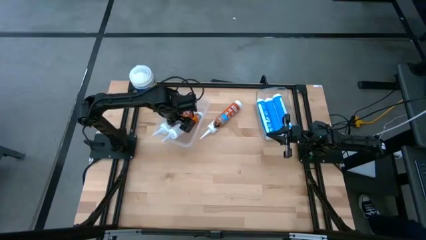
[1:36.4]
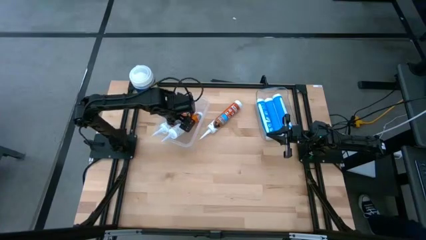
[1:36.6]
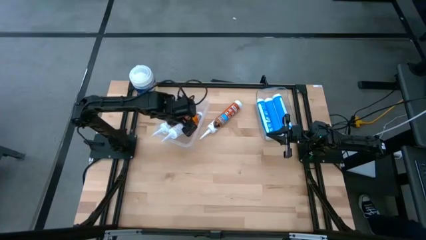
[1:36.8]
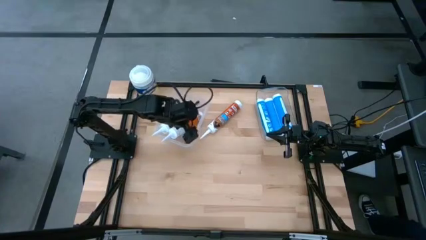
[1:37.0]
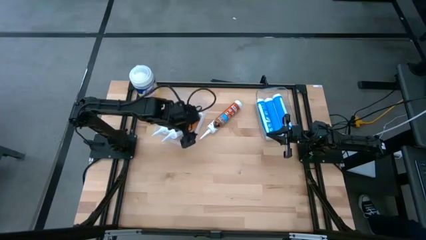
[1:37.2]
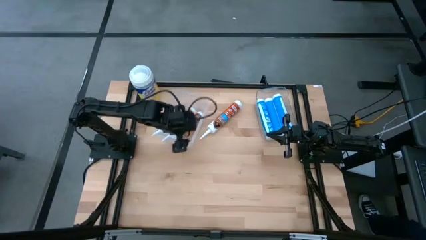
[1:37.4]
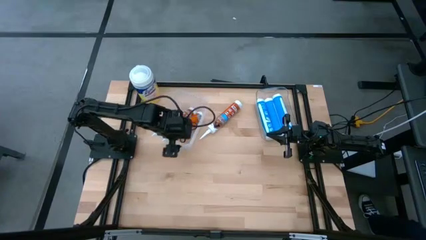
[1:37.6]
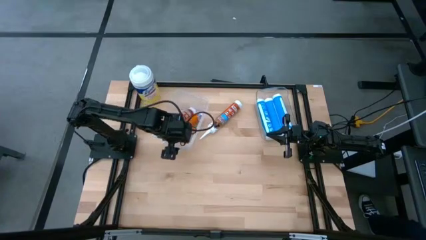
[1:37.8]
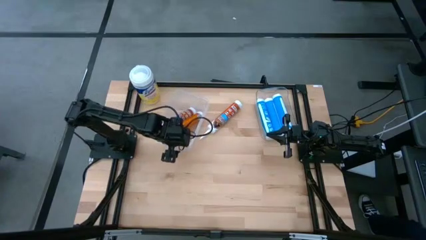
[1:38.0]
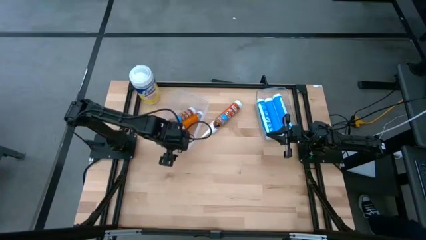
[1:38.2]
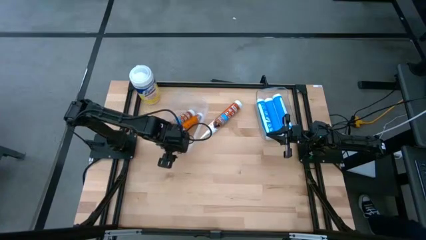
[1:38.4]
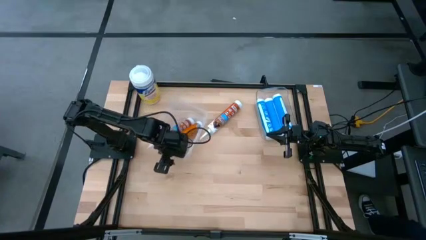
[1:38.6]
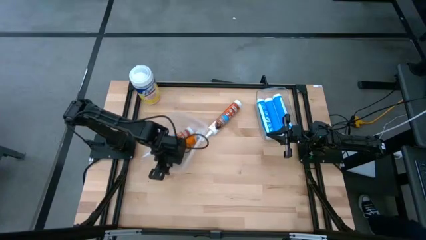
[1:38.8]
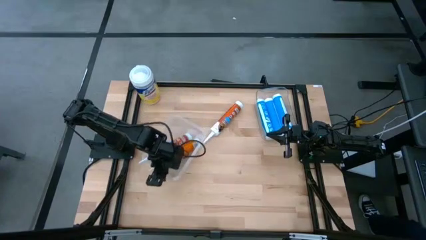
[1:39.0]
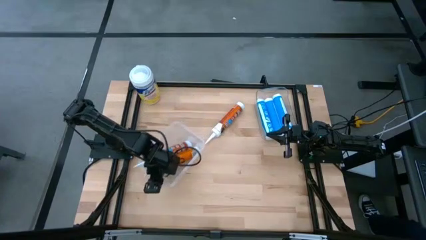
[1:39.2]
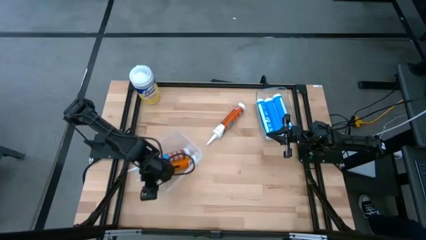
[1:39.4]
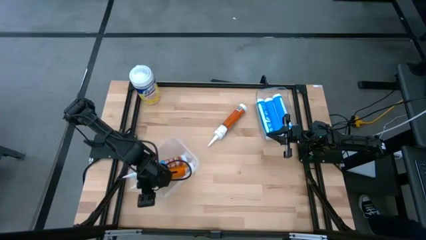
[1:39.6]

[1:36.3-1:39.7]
Task: Pick & place silicon tubes, Sealant and Lysol wipes
Move the transparent container to the bottom of the table

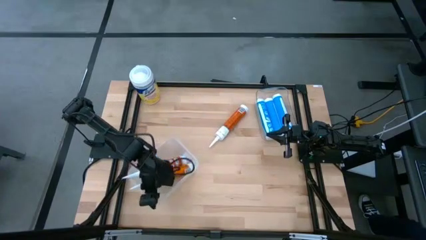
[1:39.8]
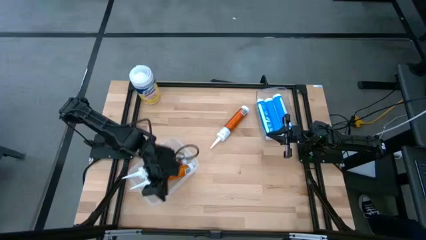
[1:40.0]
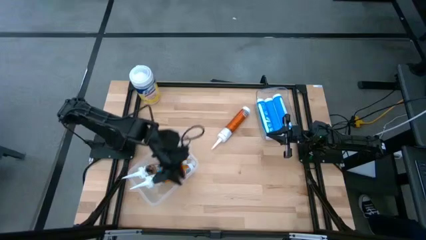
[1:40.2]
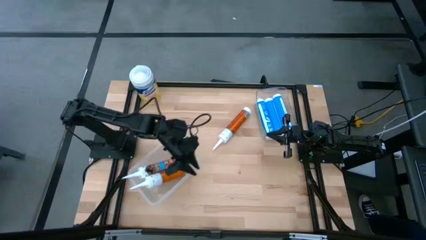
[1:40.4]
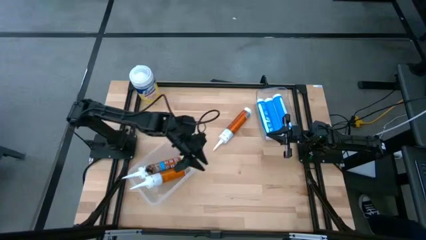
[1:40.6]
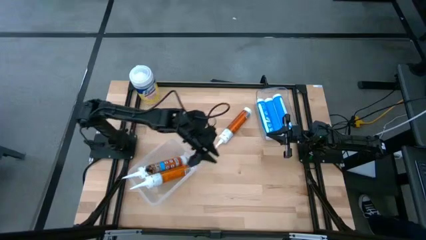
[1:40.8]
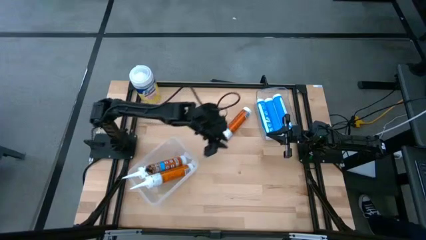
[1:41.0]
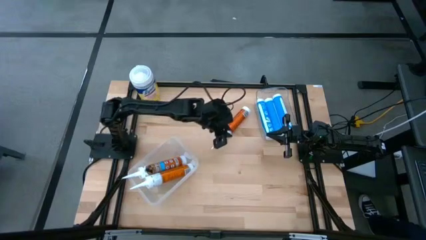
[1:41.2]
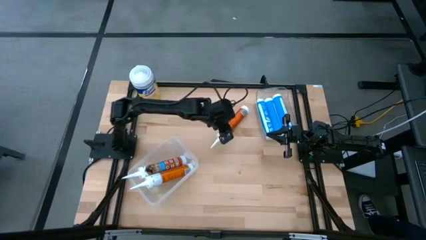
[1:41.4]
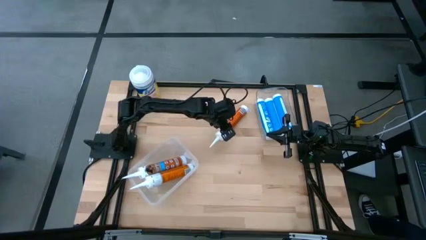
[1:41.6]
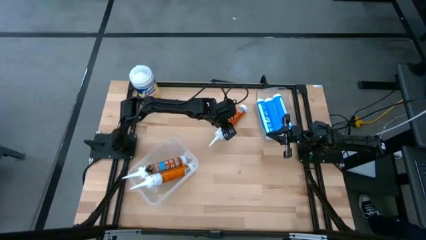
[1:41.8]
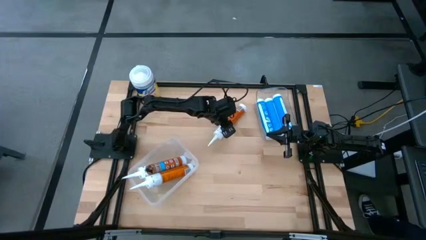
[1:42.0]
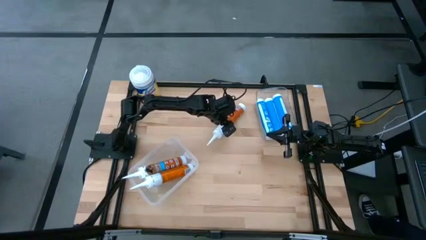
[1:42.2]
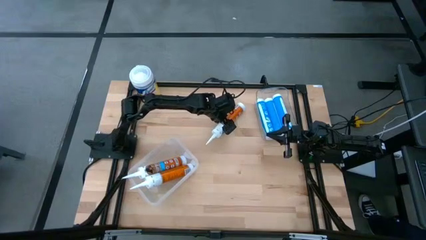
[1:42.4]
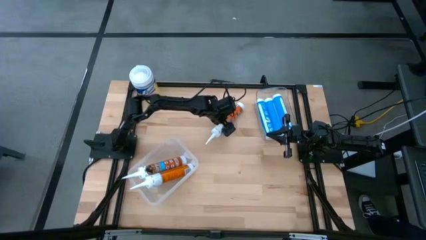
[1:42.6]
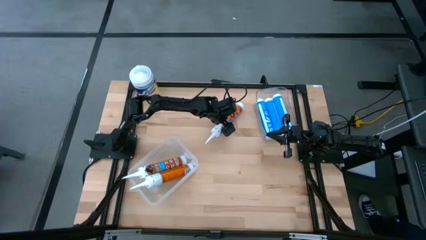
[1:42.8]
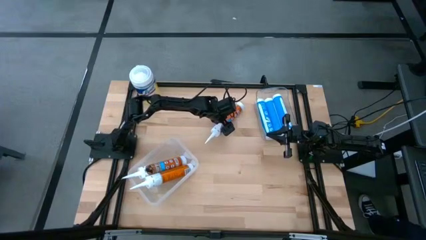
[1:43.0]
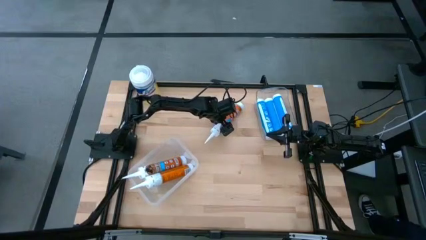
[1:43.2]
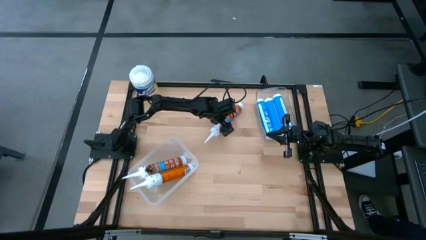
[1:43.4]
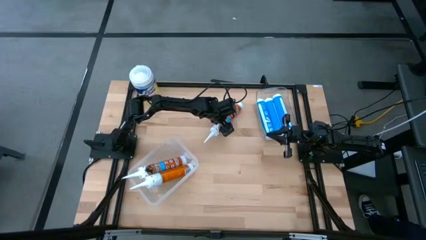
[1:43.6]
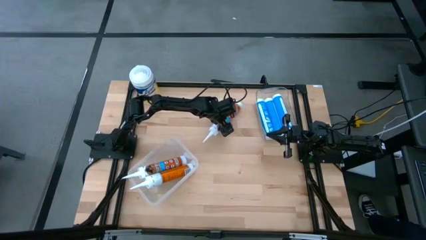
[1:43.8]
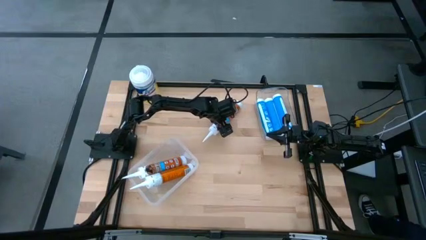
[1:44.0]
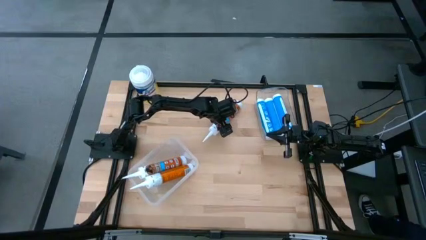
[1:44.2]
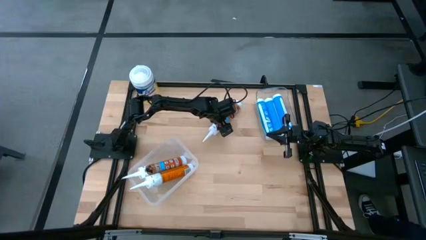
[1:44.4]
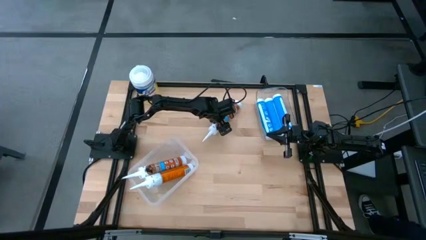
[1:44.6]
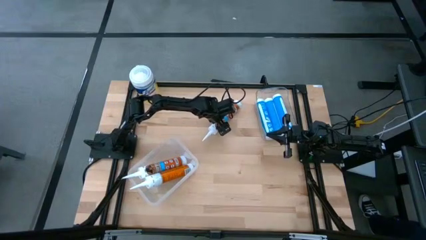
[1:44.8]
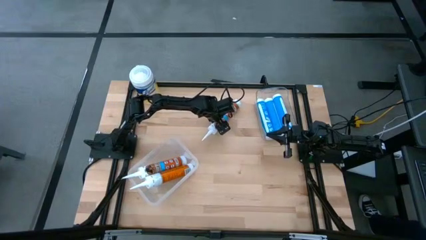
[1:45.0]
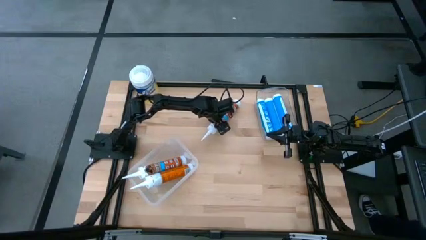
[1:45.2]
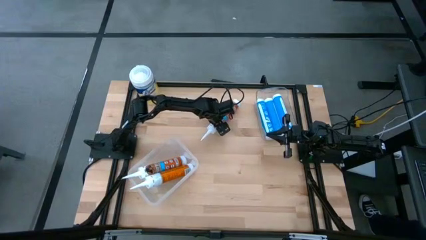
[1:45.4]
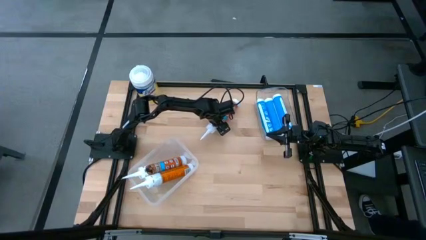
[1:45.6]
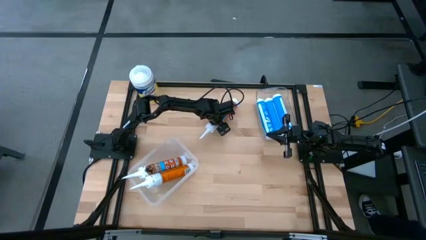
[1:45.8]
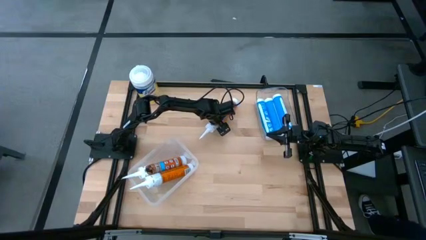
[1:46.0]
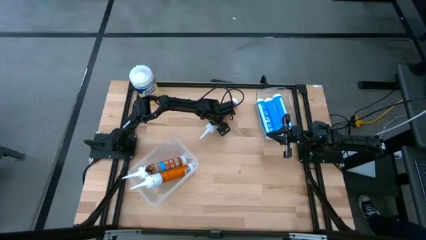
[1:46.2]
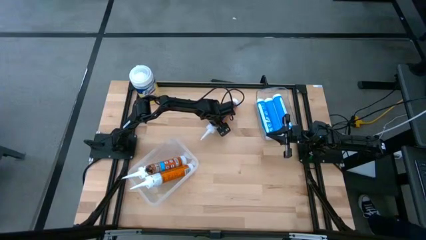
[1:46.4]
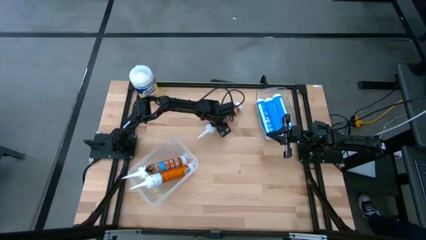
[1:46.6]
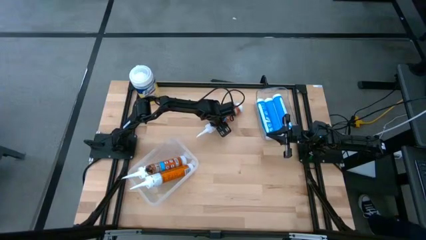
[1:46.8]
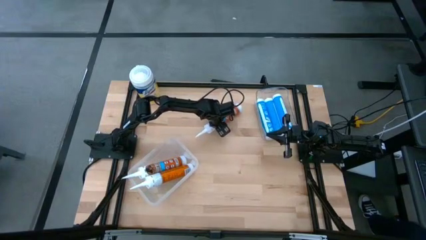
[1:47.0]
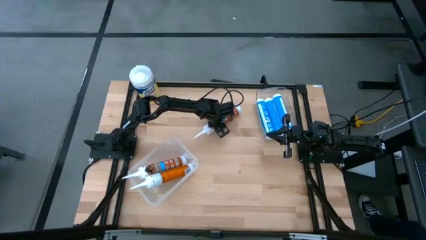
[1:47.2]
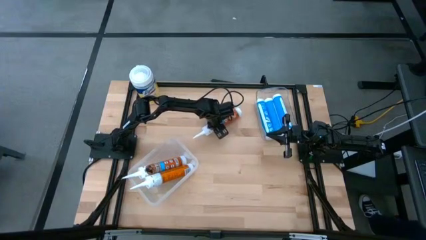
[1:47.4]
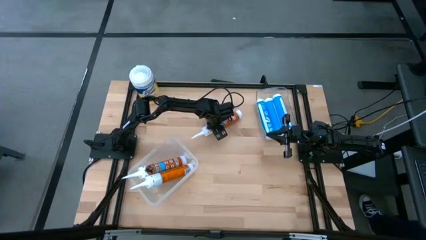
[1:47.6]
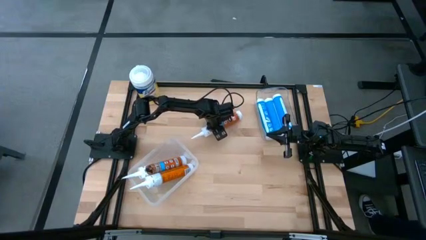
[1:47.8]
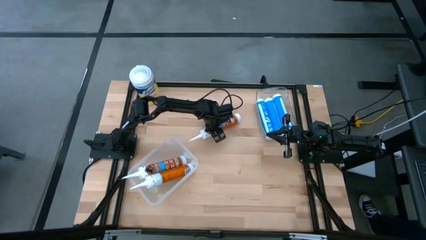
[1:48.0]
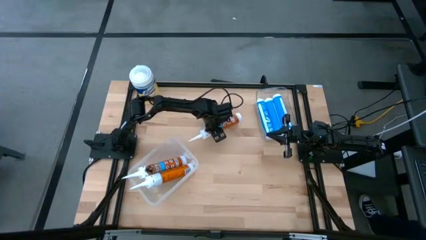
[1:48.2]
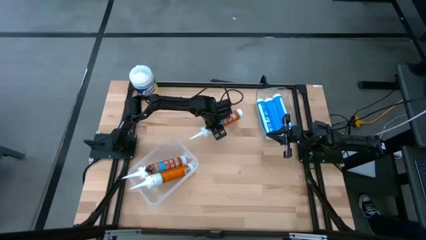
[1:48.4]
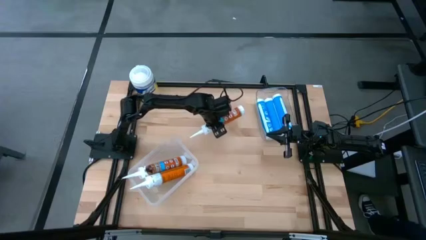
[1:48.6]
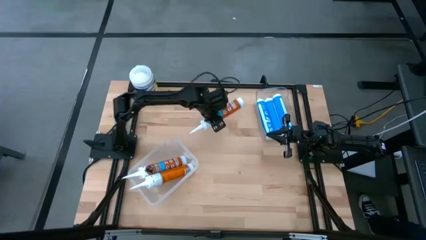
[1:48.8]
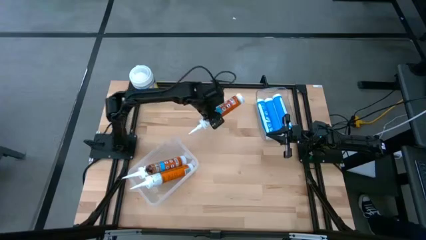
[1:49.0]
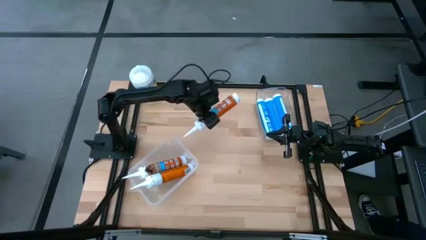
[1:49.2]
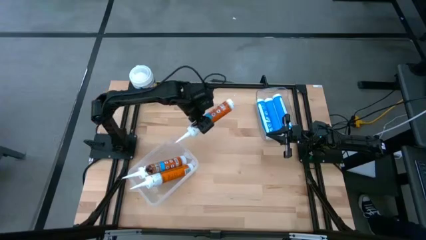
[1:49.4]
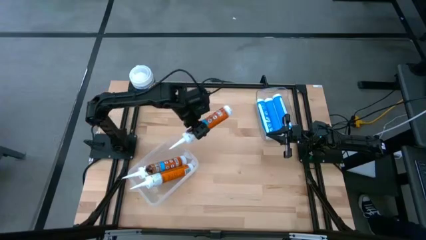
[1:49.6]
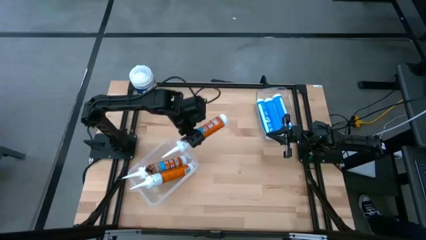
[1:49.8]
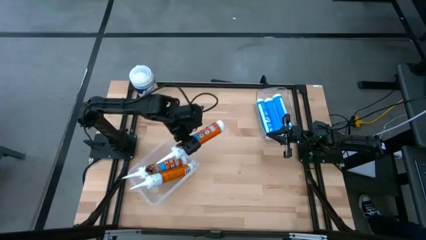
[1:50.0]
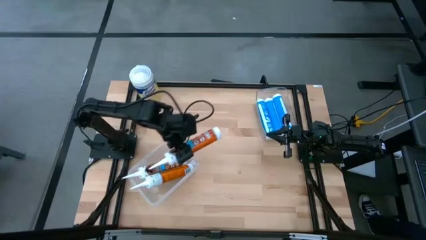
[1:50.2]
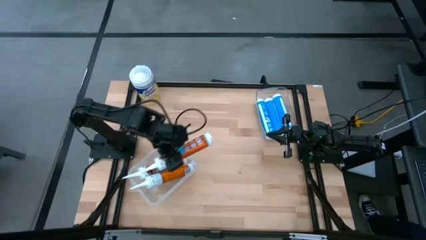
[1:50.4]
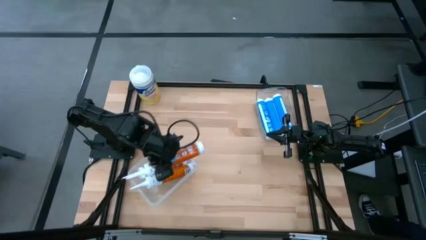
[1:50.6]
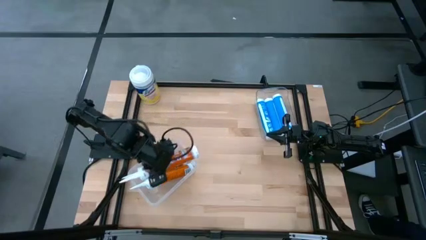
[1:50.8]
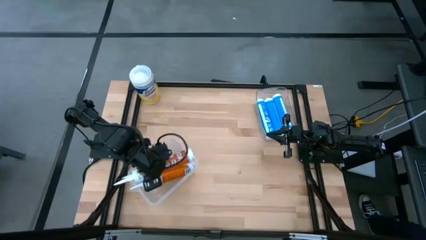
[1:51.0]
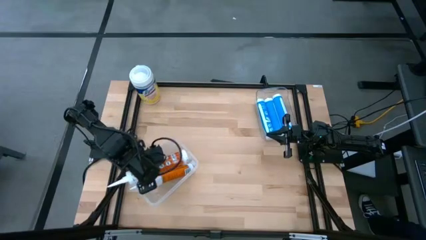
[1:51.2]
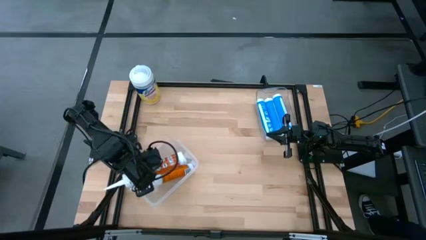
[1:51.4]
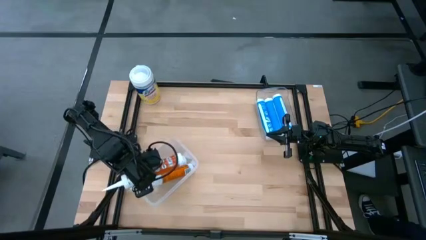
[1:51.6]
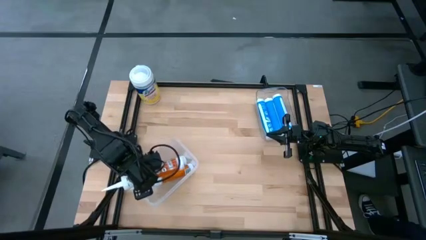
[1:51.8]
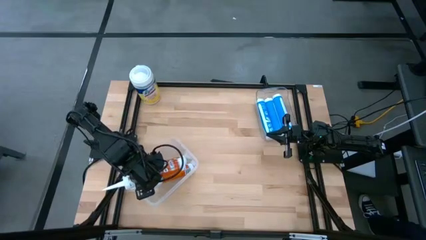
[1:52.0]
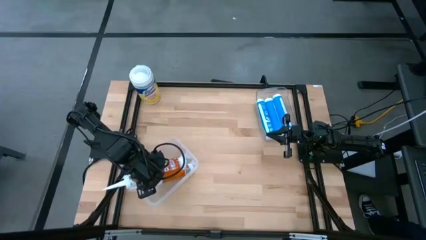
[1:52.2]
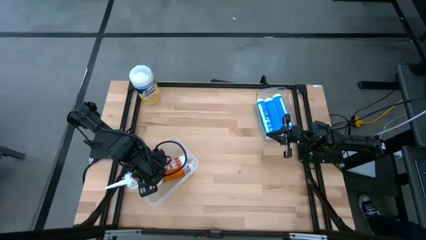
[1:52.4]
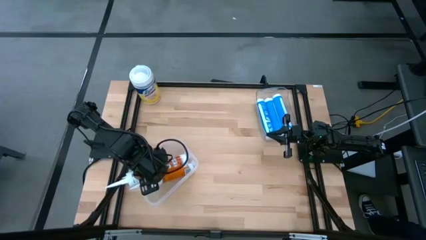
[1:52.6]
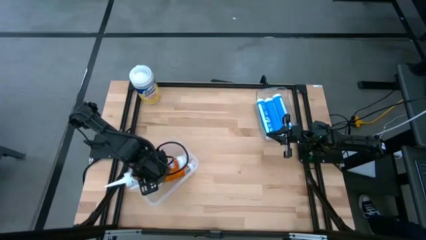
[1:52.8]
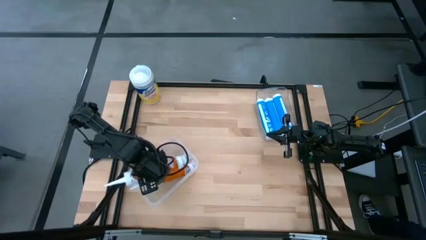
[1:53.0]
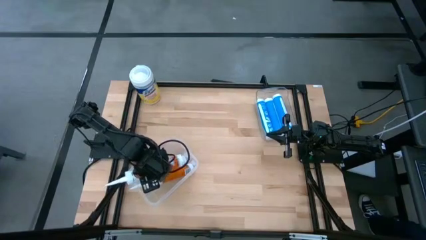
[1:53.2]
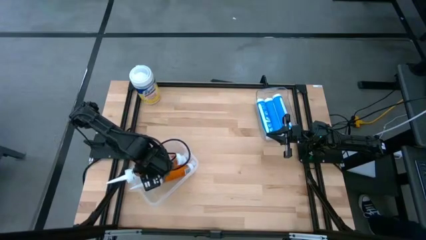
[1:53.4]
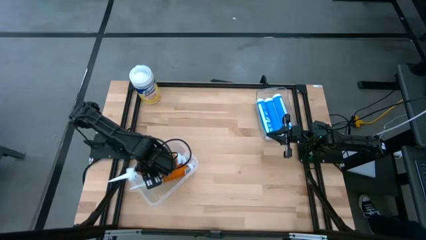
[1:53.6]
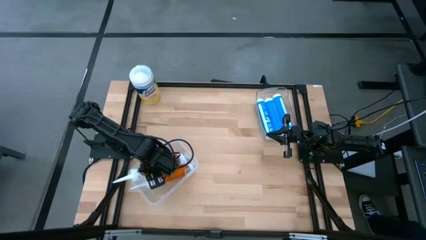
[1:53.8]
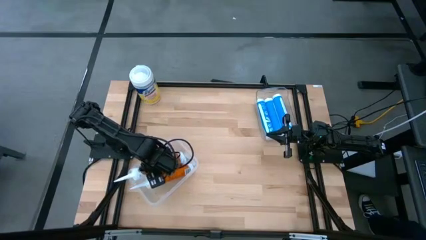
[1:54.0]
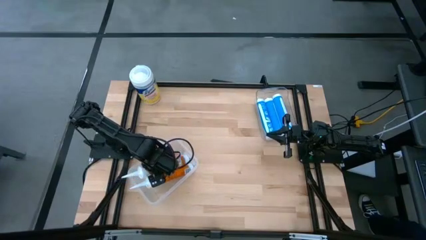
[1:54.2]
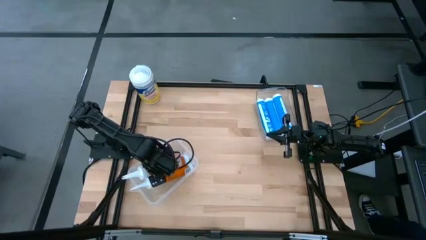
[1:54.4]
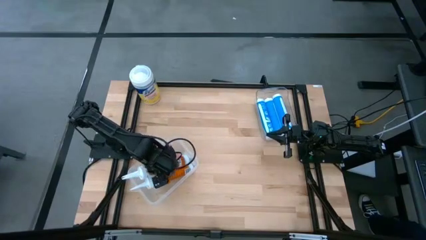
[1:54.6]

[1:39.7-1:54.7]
Put the orange sealant into the transparent container
